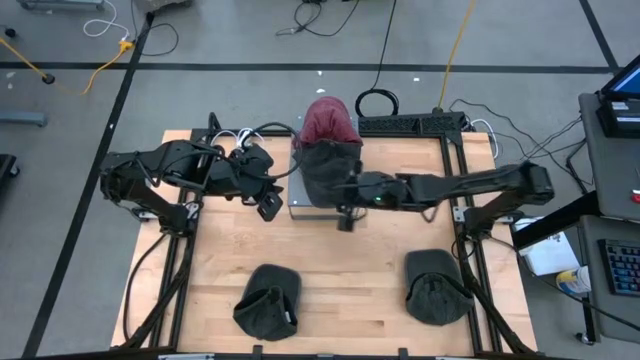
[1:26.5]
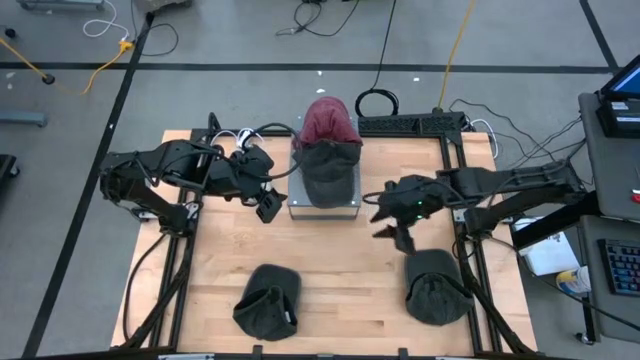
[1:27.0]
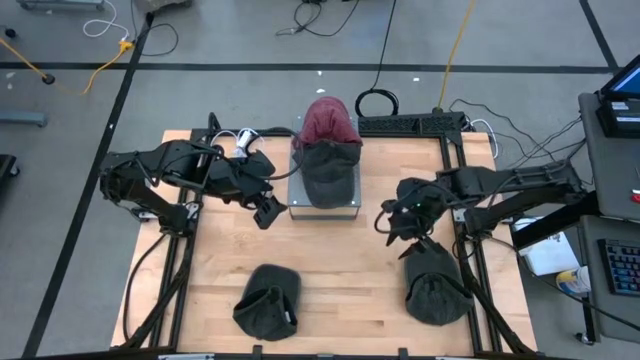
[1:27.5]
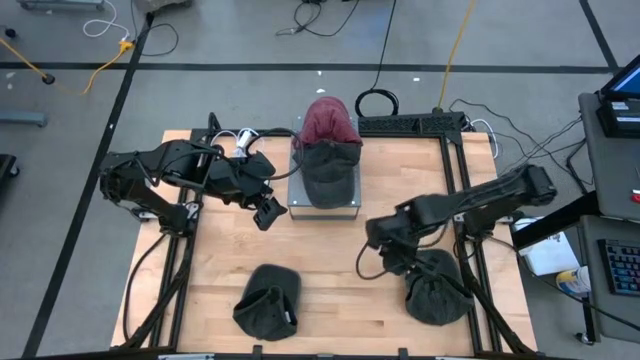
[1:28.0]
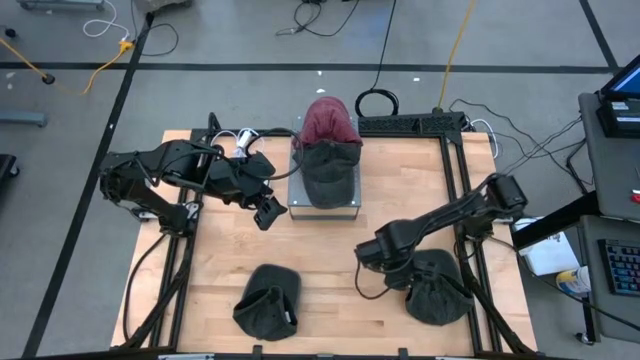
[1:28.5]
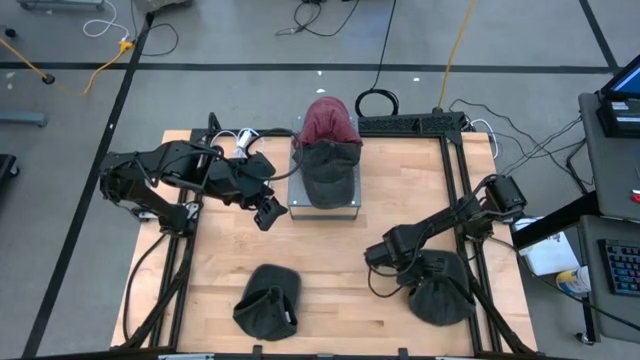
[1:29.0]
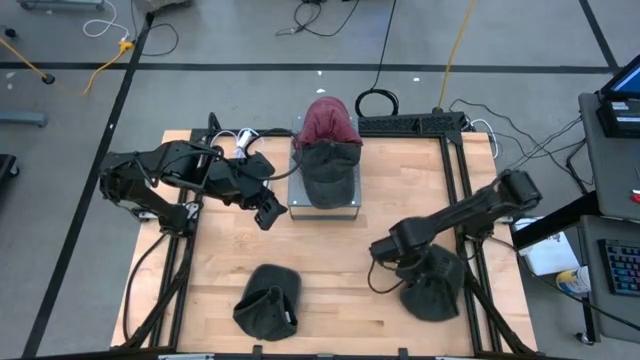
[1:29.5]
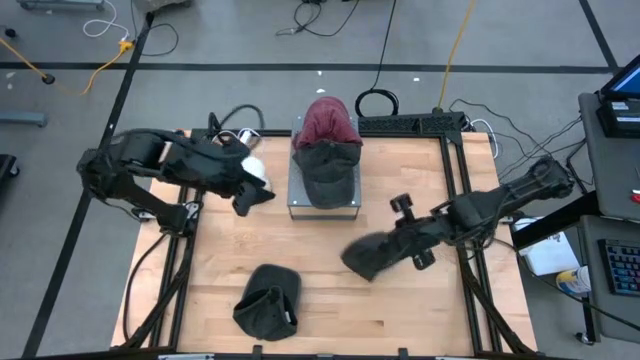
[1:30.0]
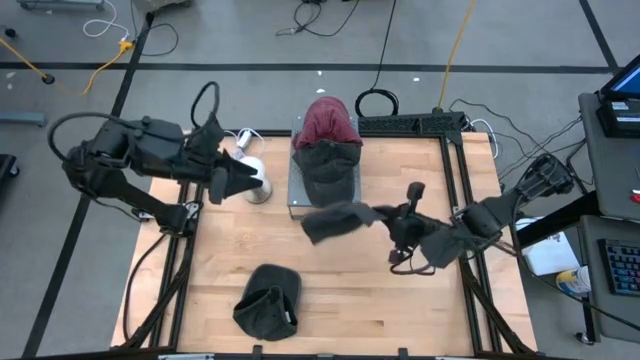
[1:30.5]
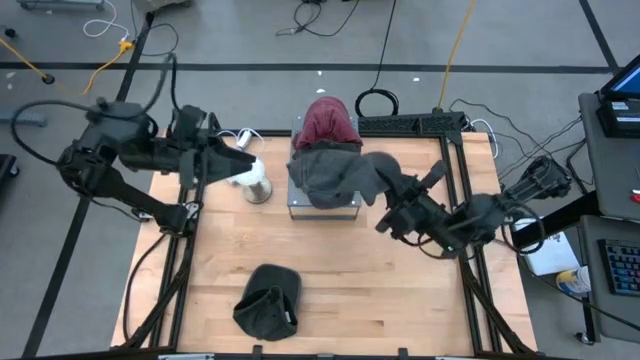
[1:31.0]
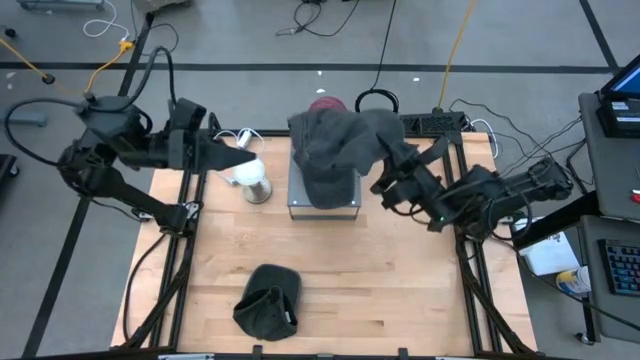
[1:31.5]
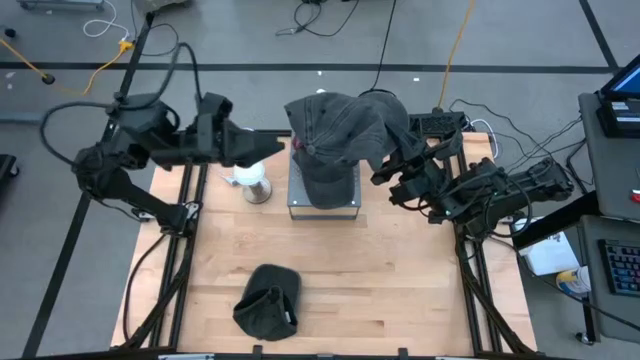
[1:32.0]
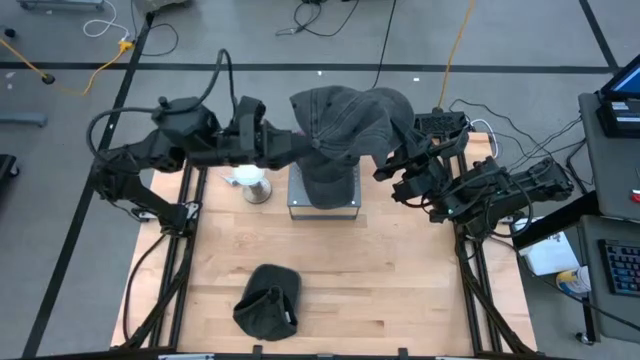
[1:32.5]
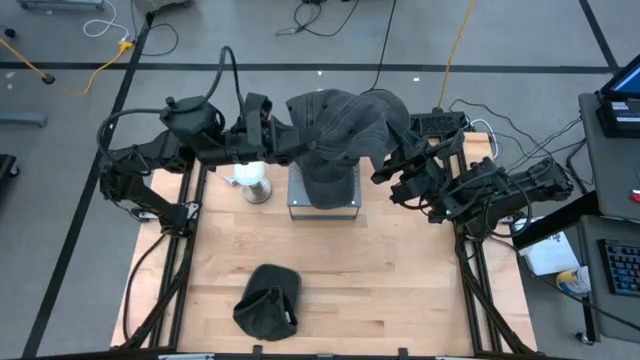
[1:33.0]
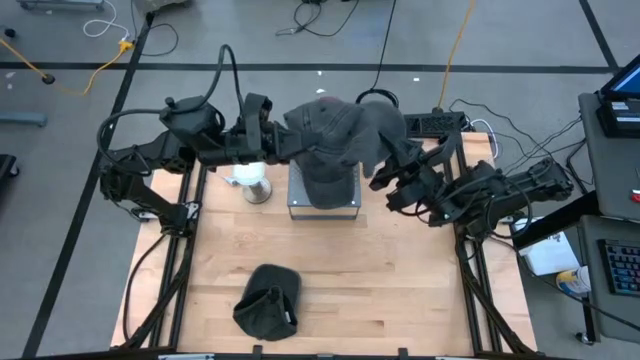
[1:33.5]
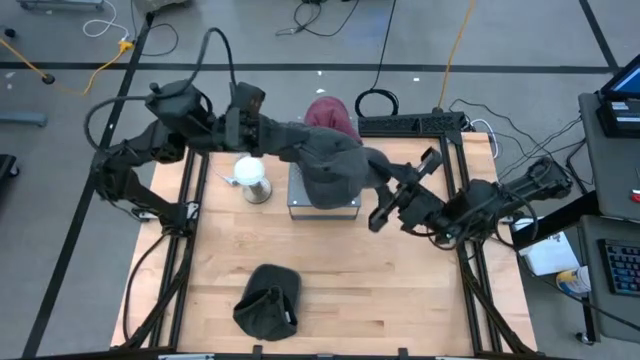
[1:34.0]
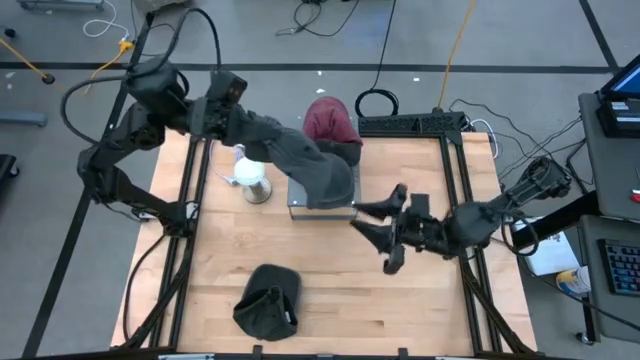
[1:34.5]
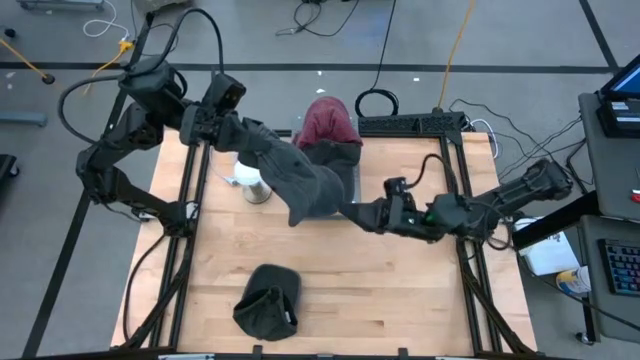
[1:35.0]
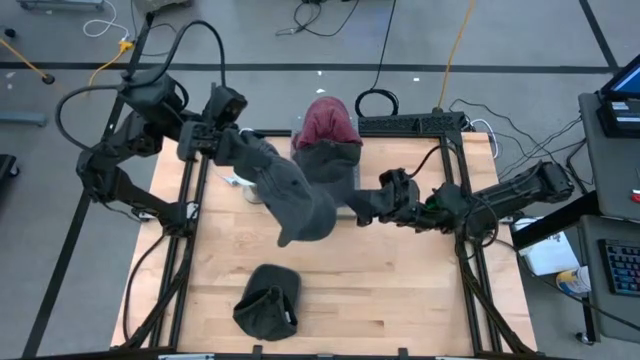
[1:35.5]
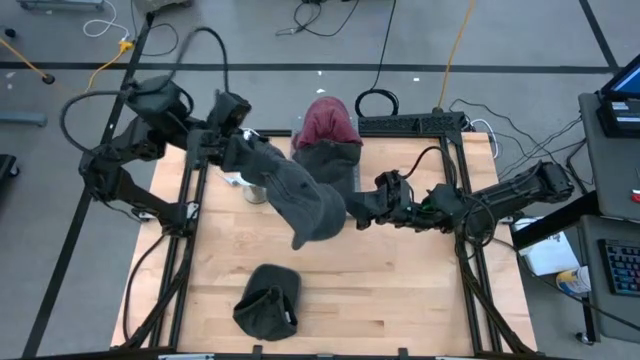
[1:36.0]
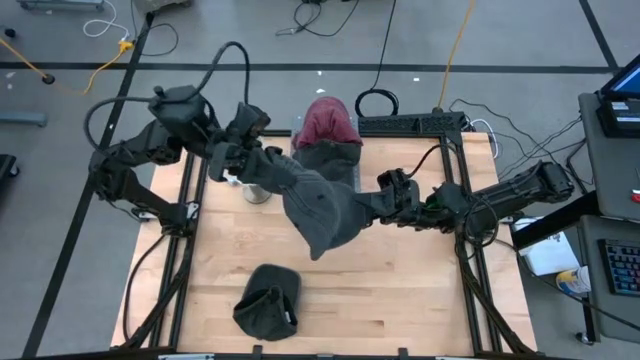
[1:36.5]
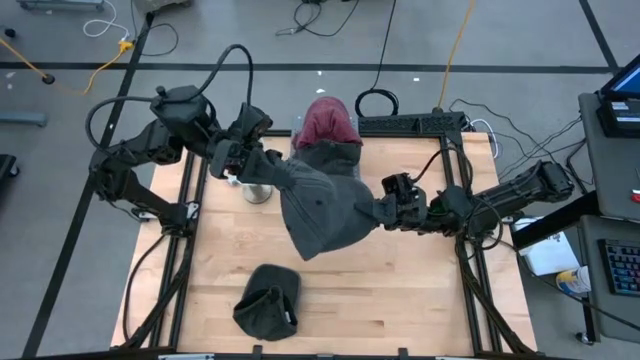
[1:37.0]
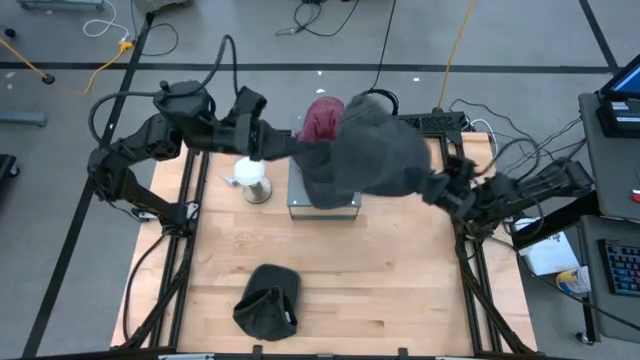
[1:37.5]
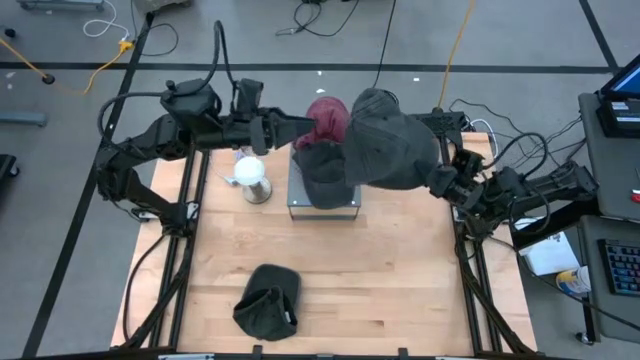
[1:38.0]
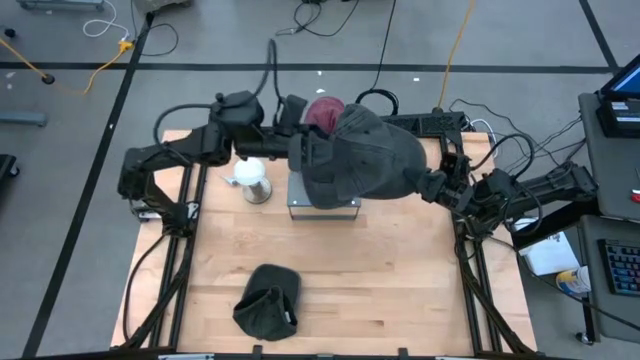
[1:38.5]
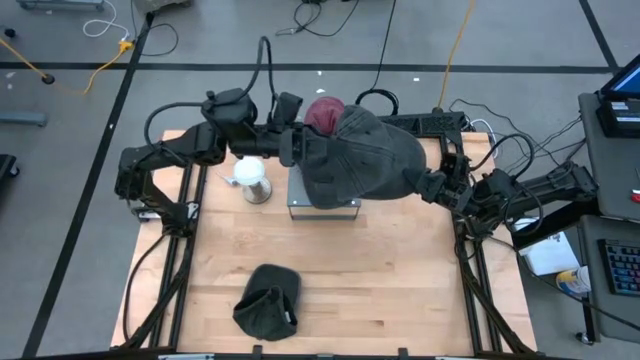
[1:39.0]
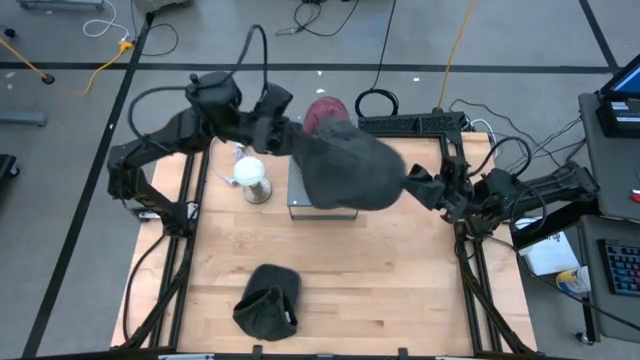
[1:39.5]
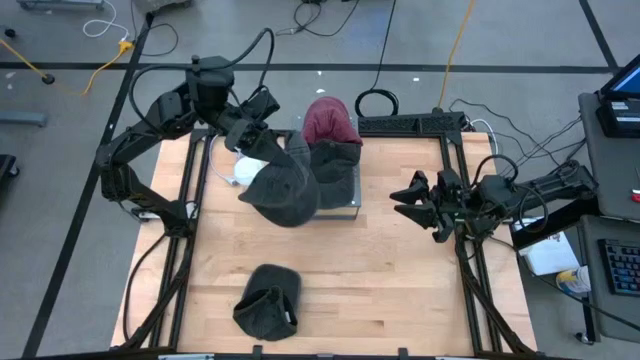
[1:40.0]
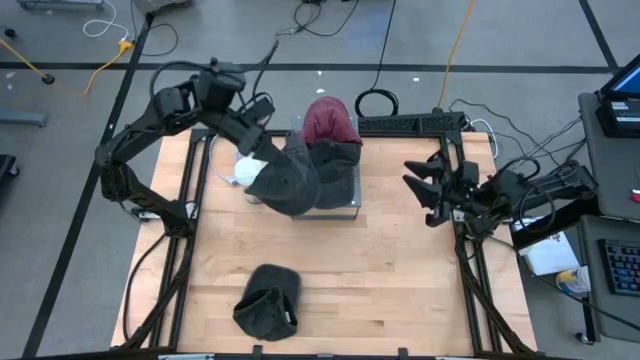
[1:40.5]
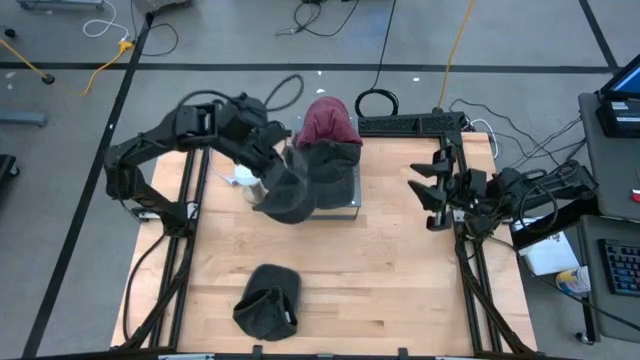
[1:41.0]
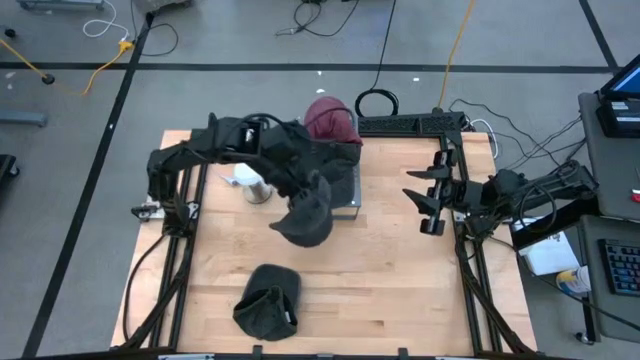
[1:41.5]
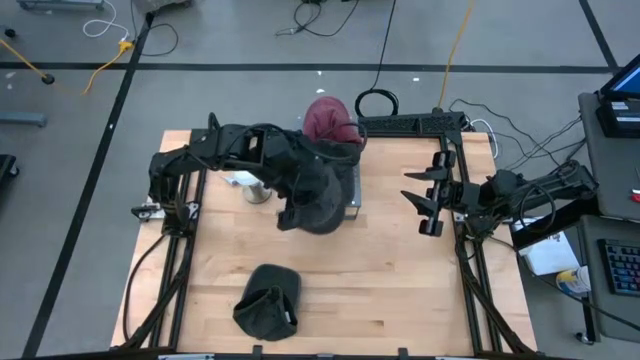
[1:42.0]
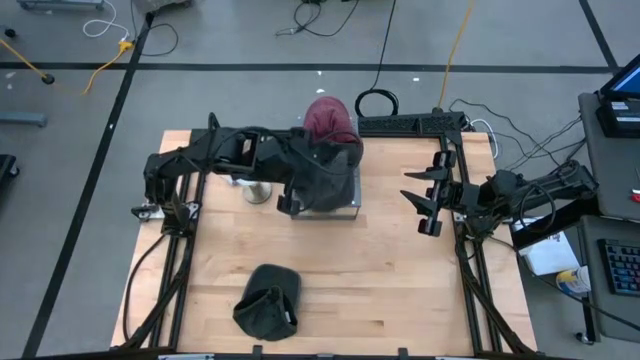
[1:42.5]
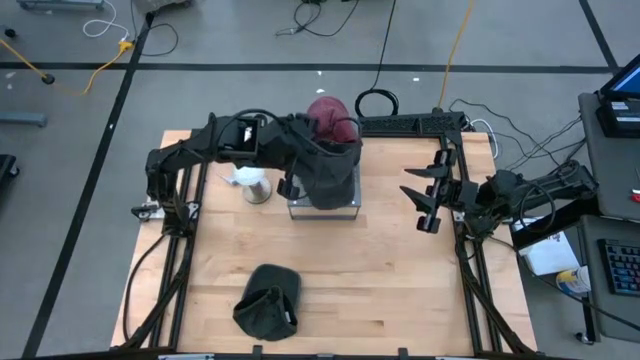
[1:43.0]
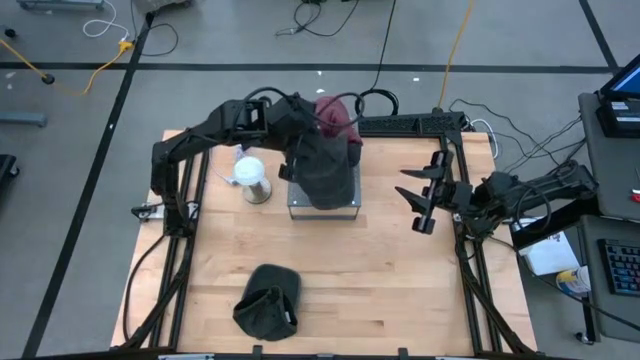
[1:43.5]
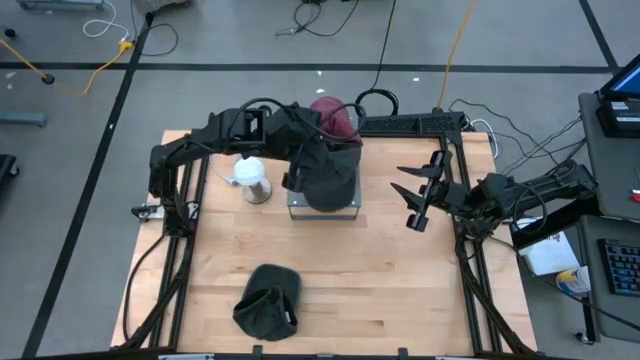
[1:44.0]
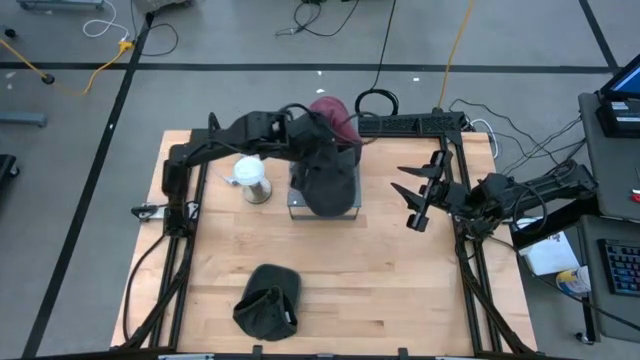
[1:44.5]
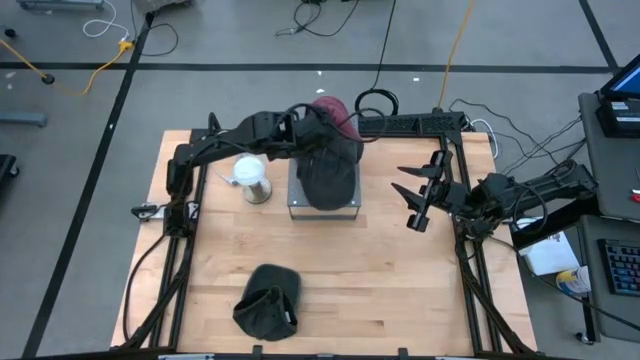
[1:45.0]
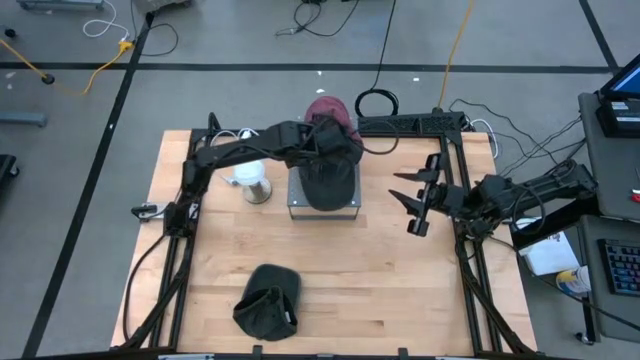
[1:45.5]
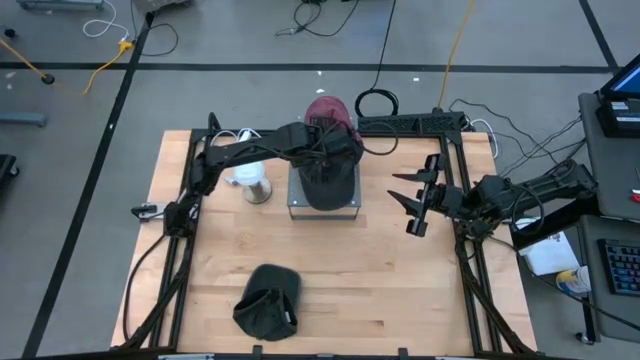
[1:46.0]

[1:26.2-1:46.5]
Task: Pick & Place hat
Stack the right black cap on top of the black cap on the shelf

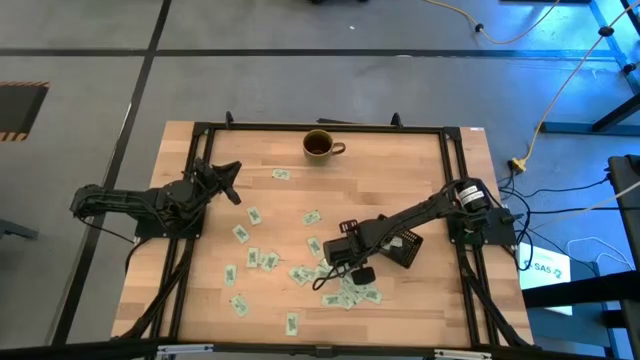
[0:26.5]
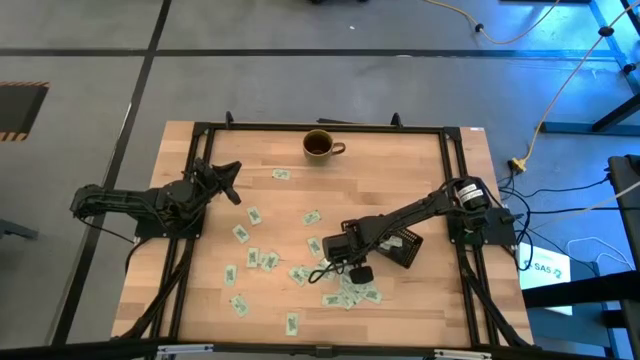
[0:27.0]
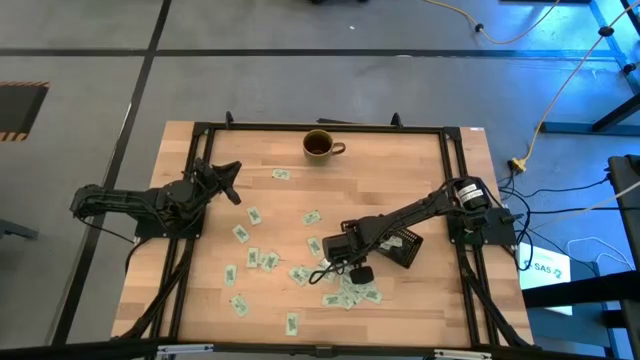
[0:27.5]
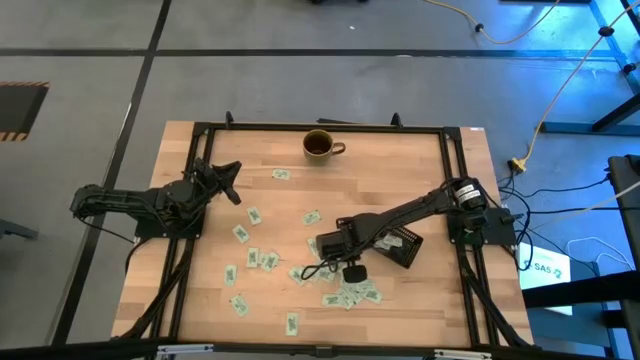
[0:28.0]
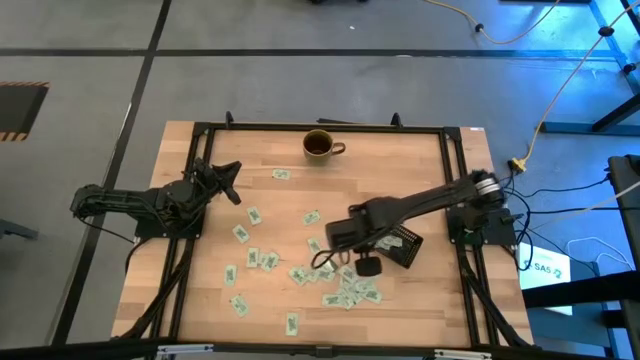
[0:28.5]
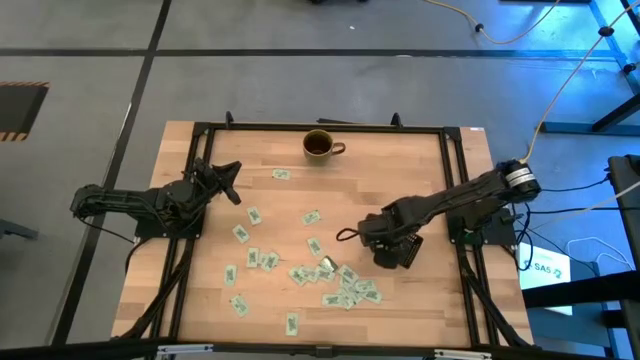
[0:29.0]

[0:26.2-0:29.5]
Task: Pick and place Stevia / Truvia into bins
Put the stevia packet into the black bin
